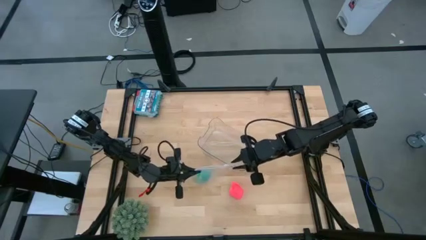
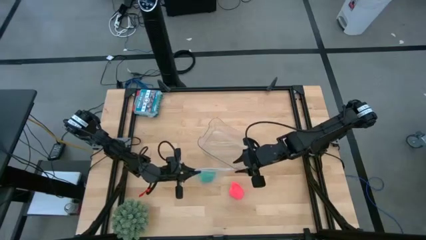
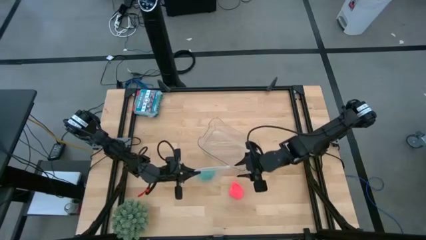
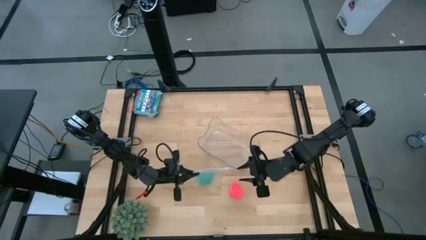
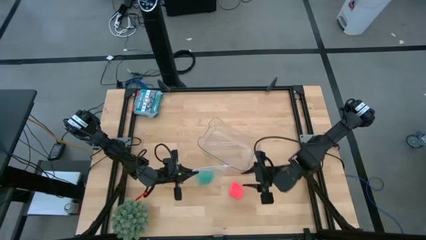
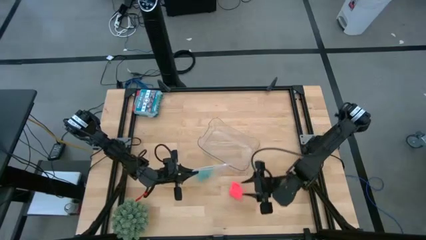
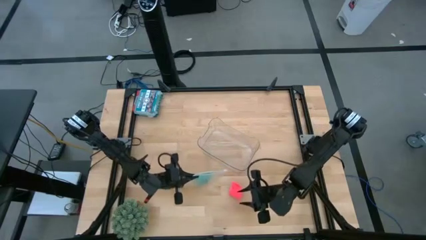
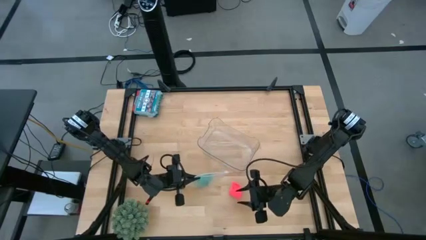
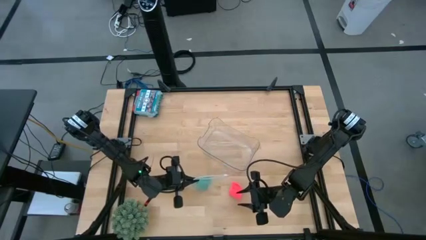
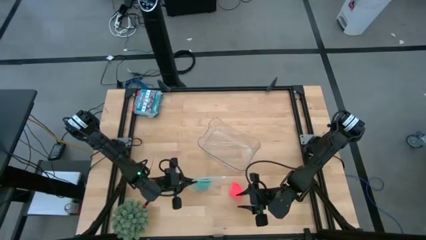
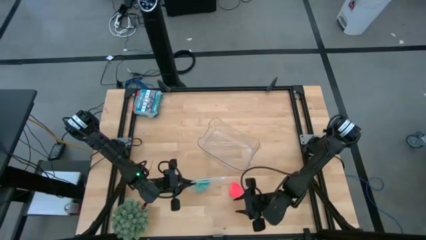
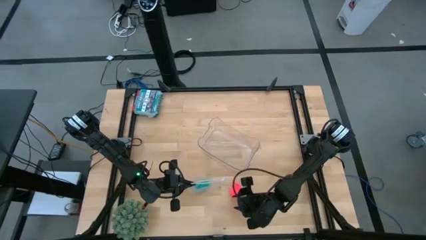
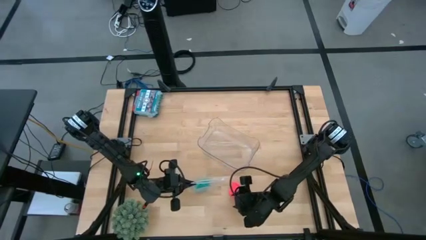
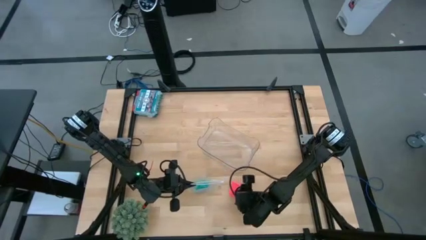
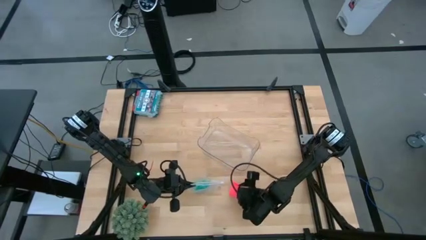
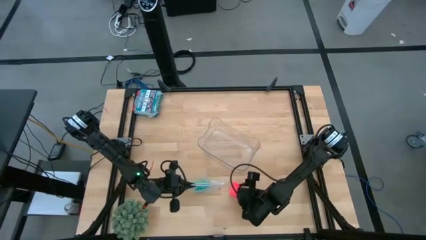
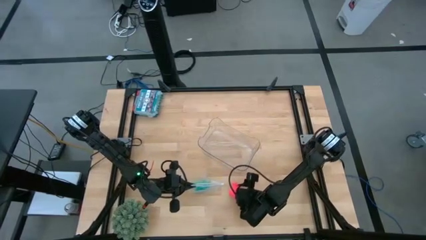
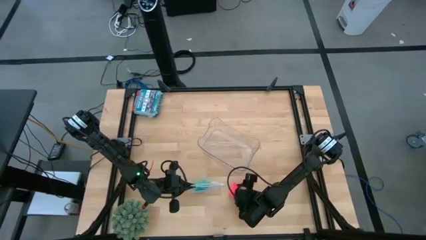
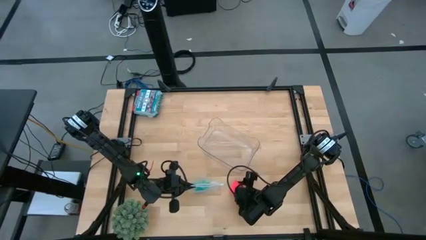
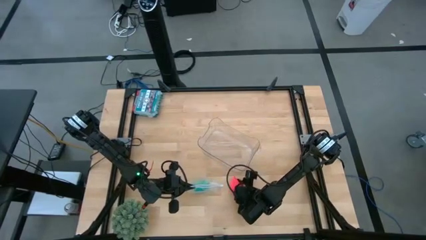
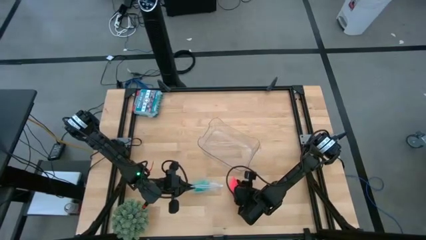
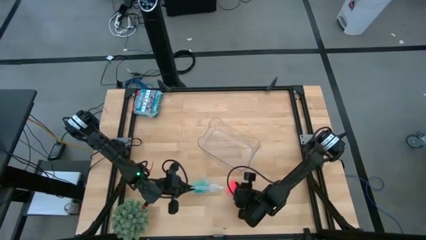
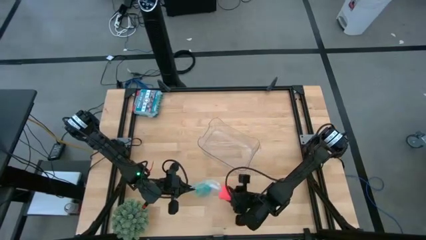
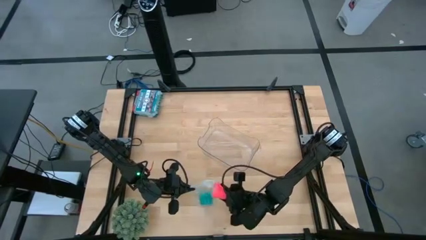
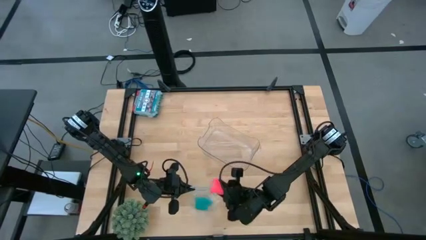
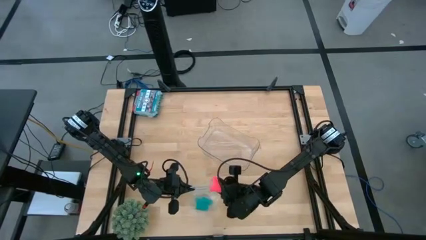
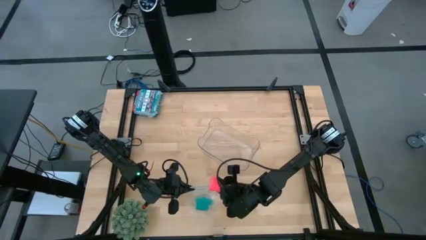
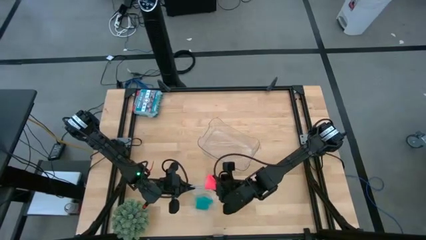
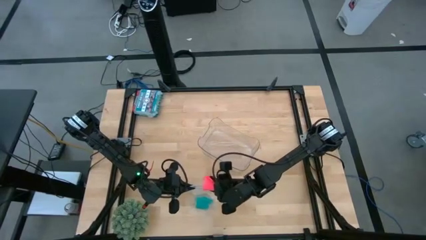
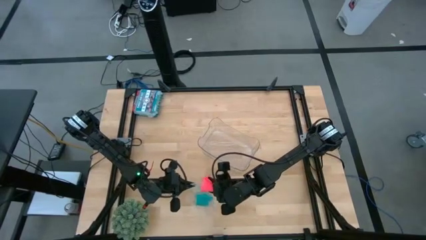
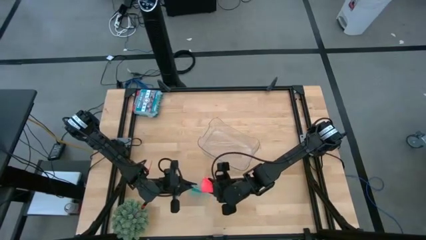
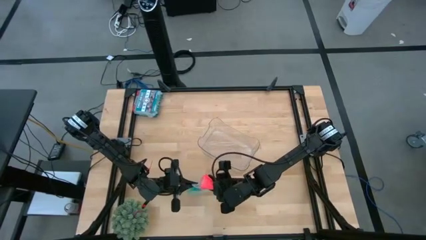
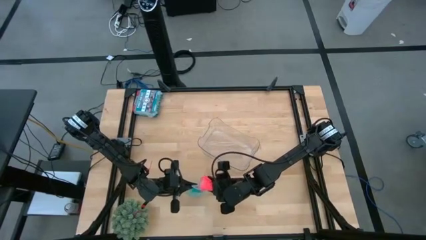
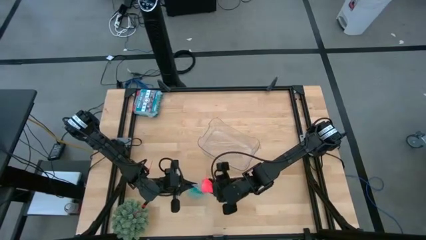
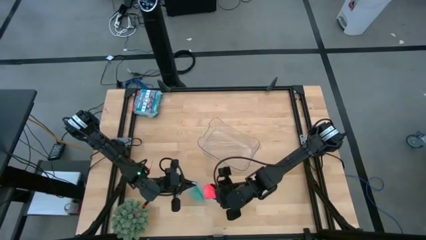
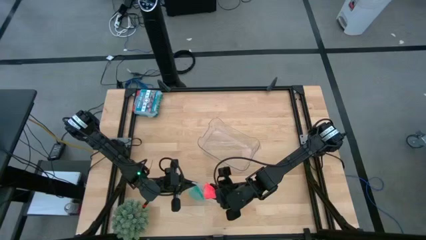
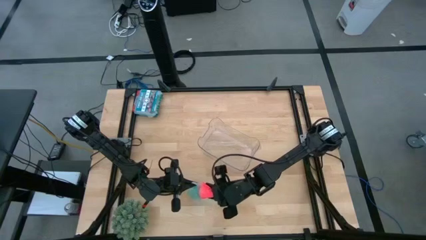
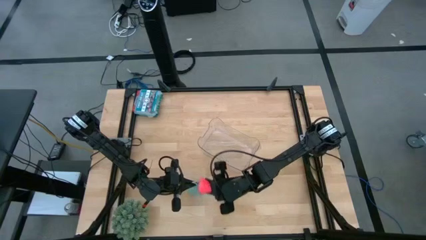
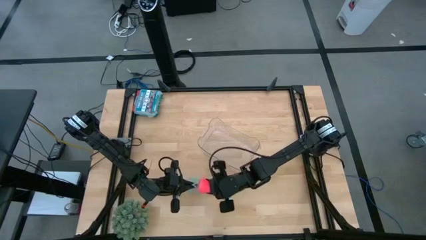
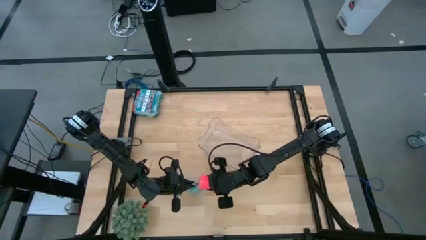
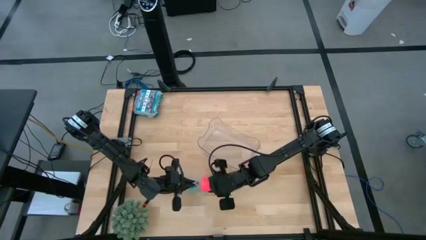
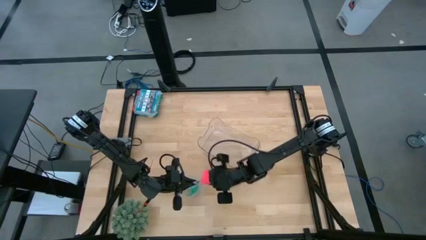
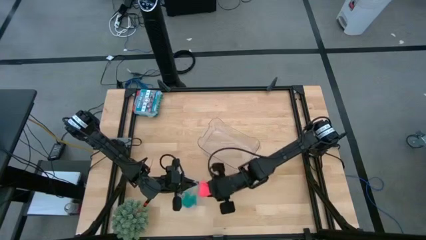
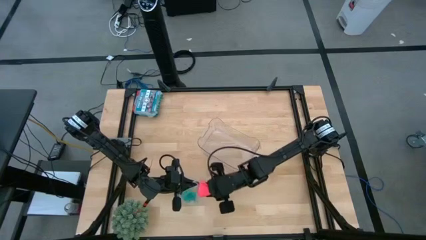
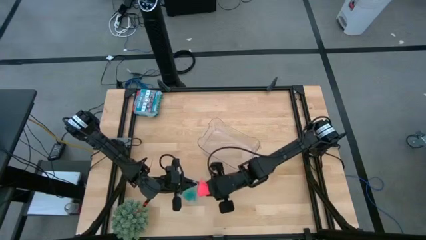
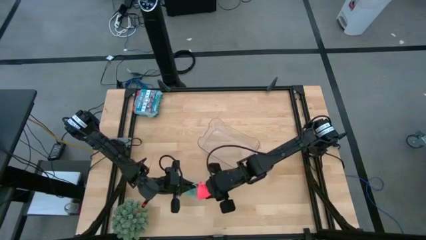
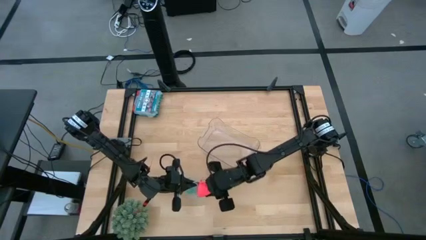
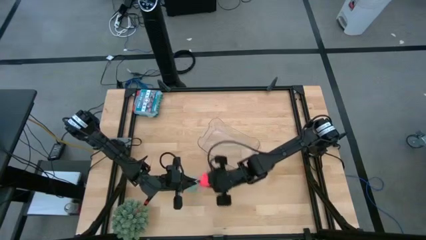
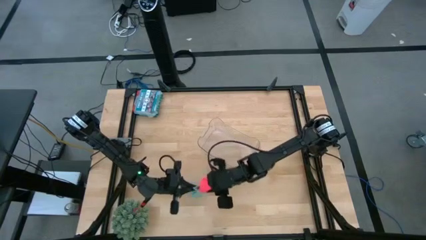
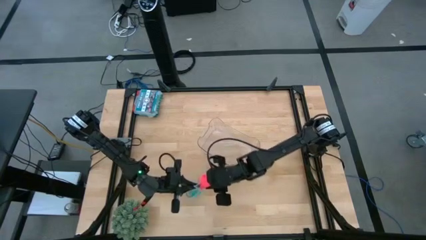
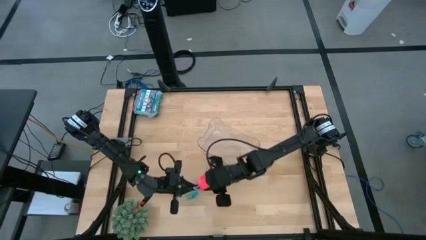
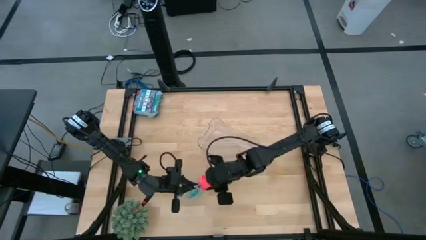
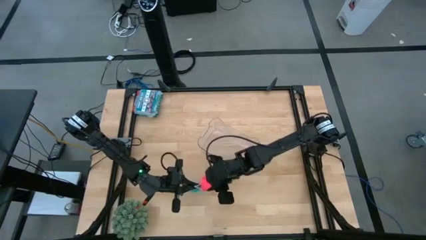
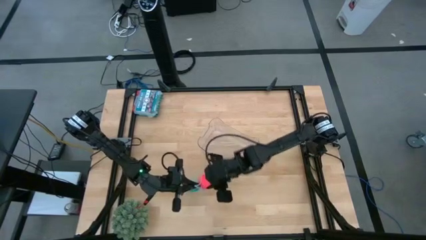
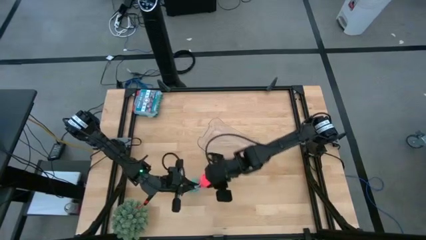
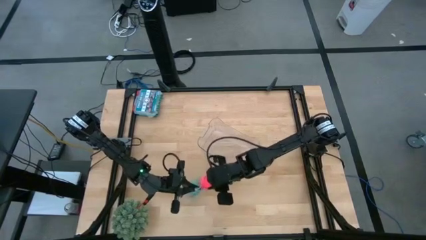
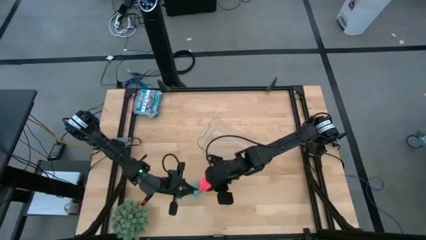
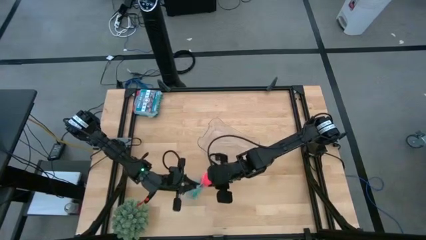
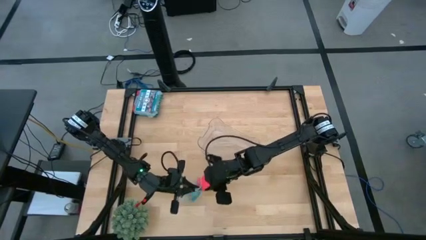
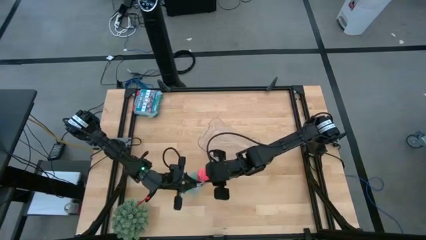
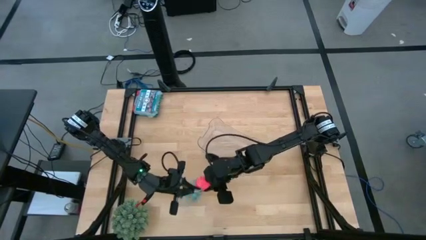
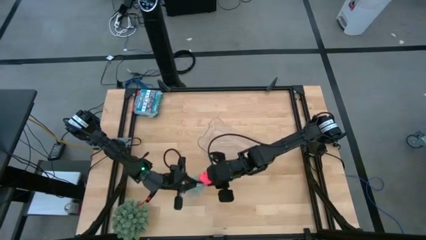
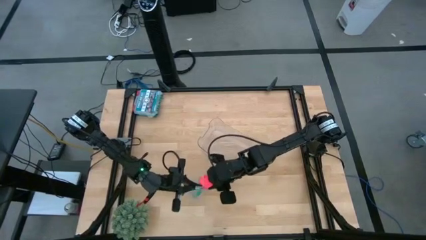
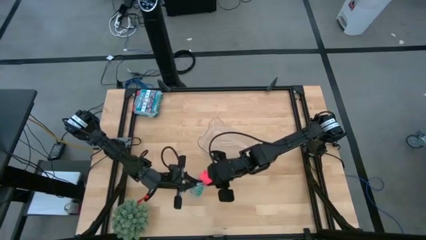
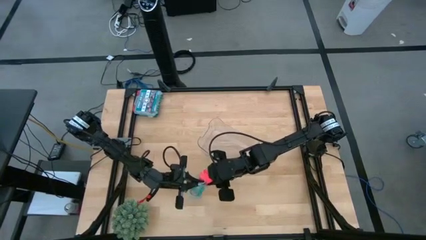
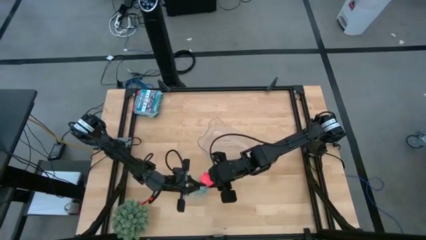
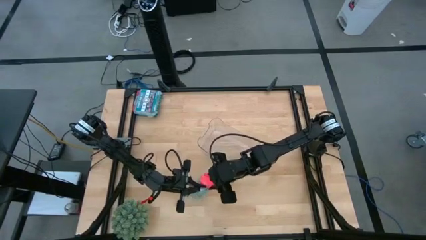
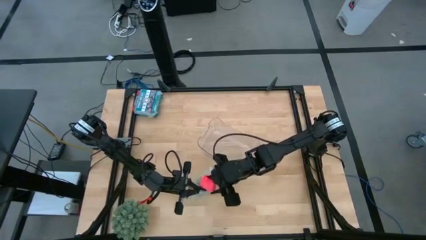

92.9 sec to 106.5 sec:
Task: Roll bandage
Put the pink bandage into the transparent zip bag

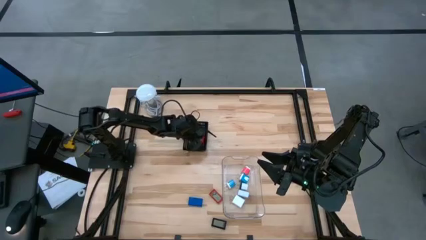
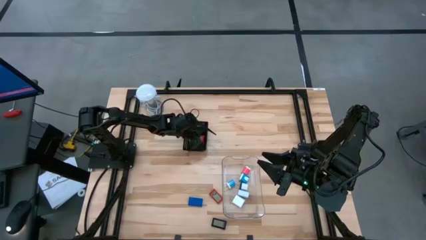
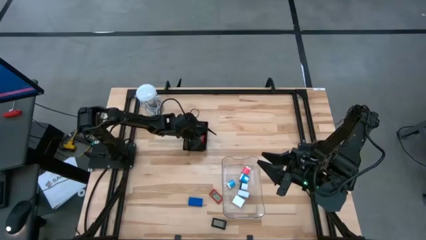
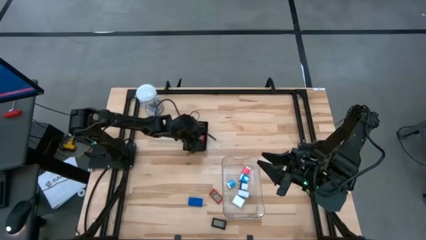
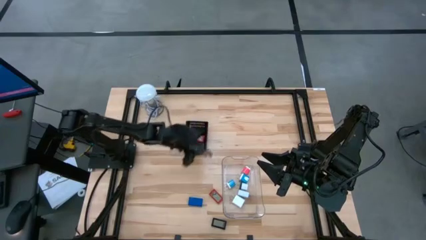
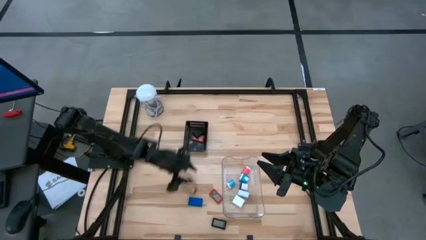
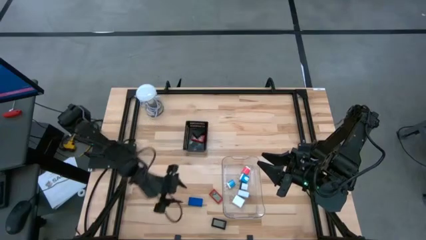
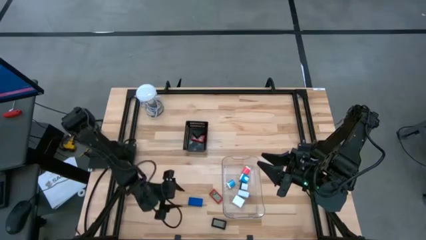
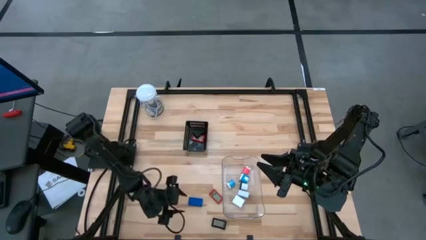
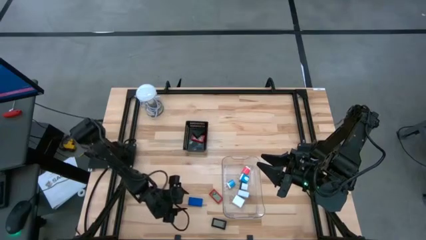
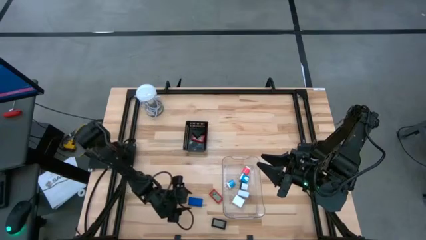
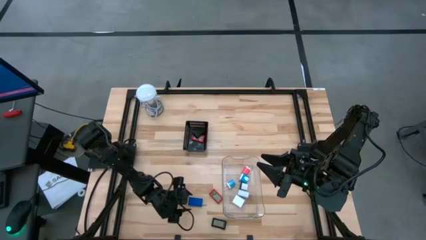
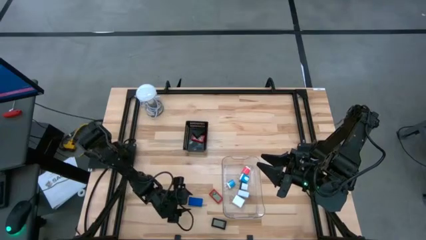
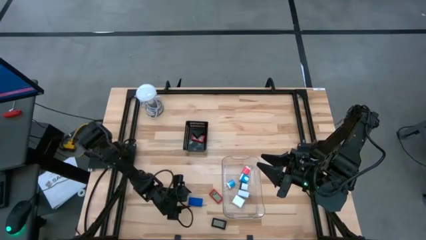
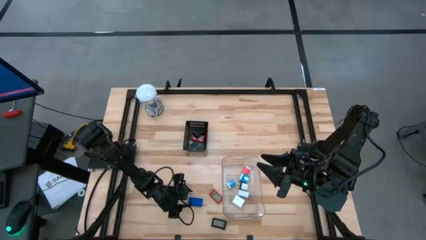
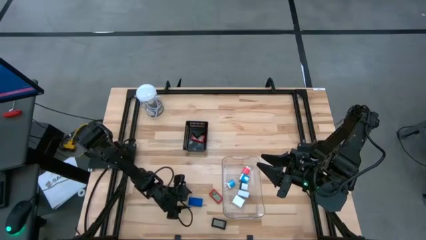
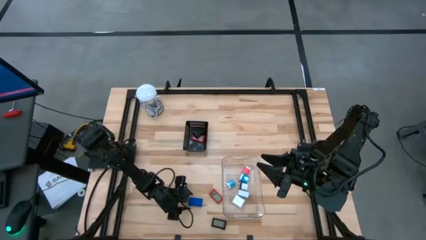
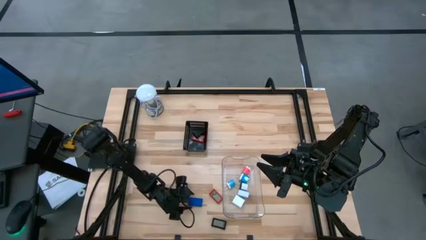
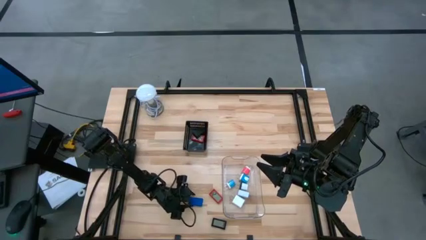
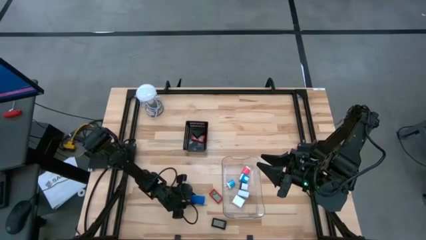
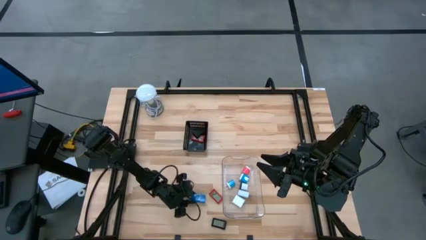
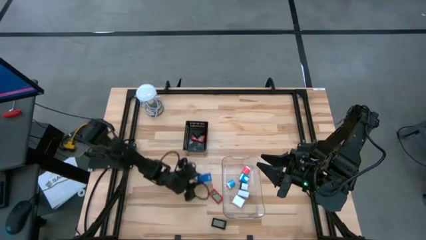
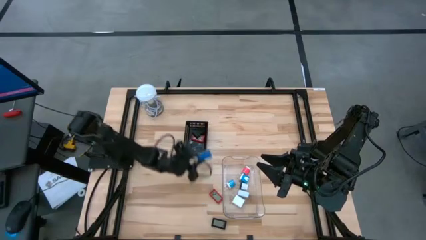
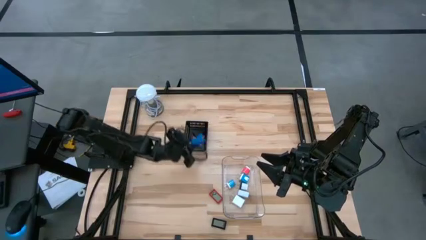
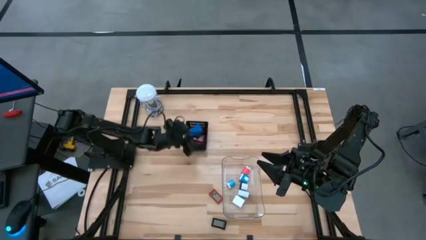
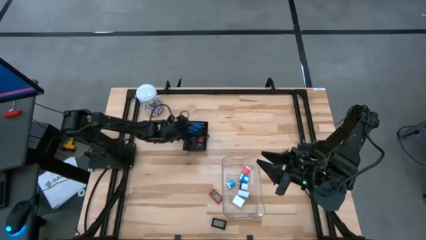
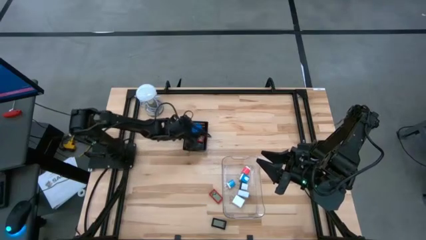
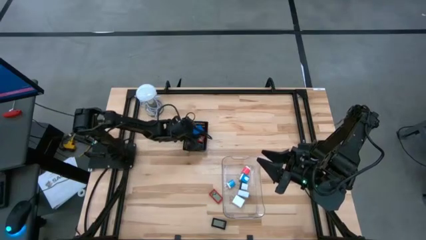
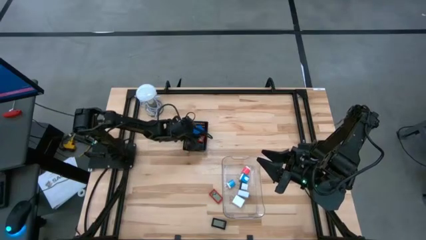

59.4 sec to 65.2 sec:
Task: Pick & Place Office items
Put the blue digital clock into the black bin
